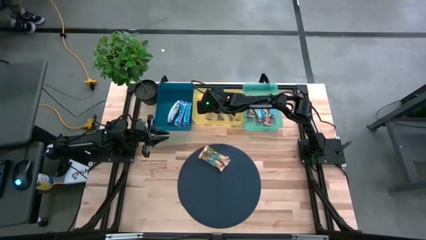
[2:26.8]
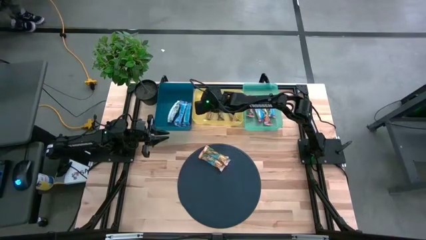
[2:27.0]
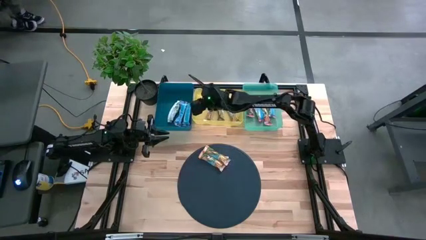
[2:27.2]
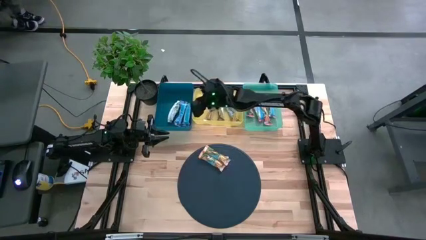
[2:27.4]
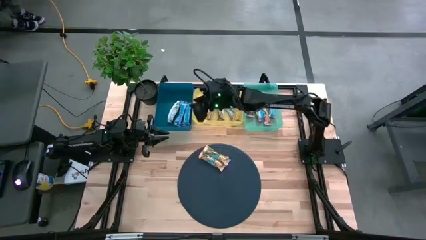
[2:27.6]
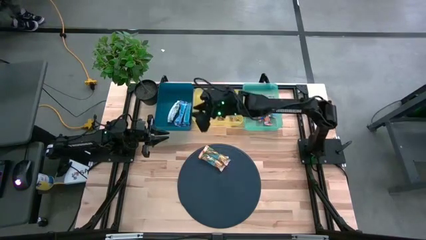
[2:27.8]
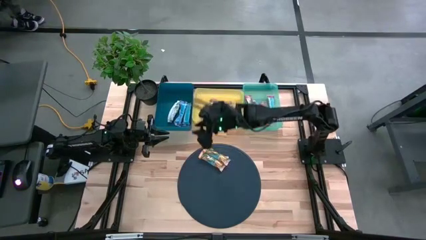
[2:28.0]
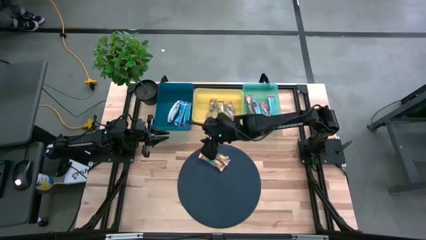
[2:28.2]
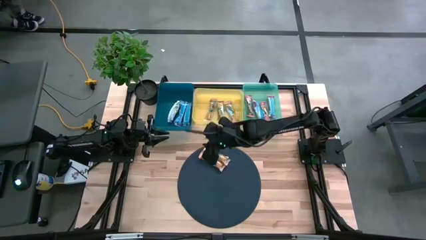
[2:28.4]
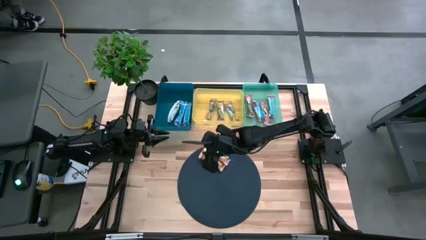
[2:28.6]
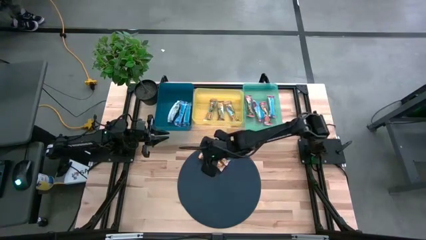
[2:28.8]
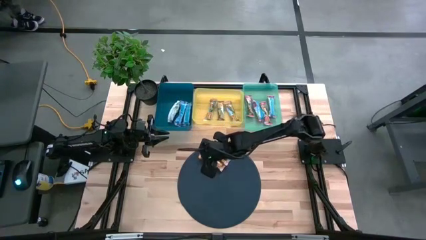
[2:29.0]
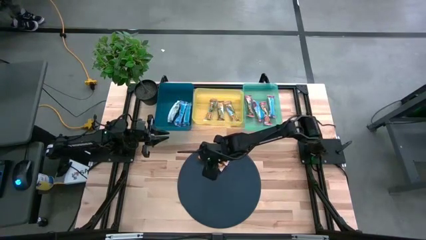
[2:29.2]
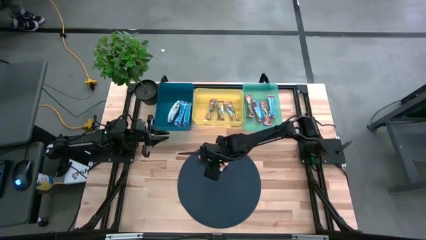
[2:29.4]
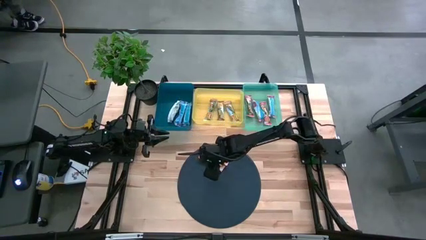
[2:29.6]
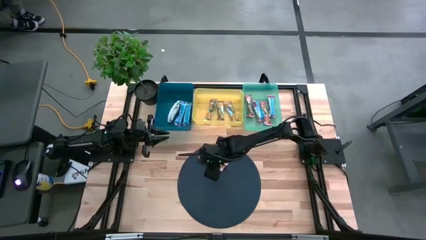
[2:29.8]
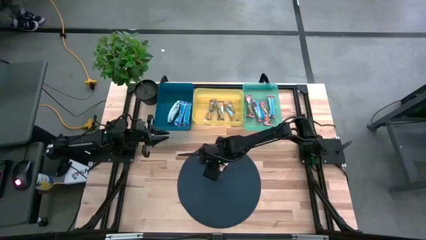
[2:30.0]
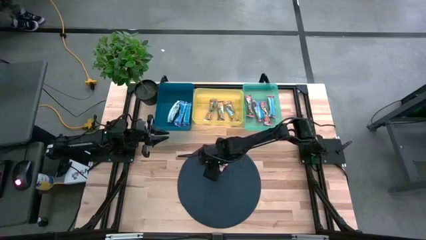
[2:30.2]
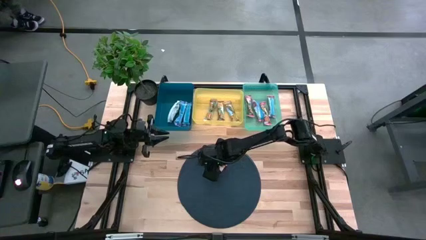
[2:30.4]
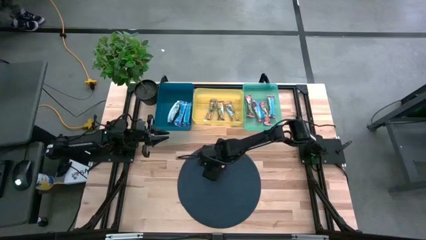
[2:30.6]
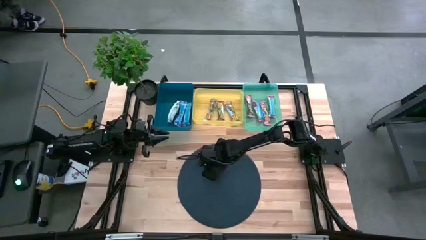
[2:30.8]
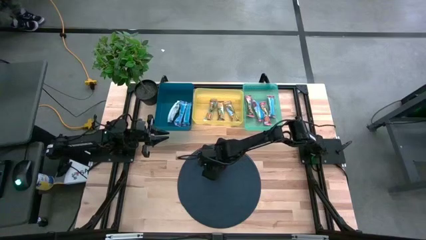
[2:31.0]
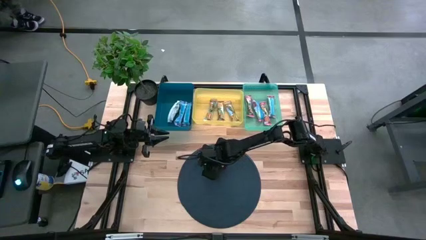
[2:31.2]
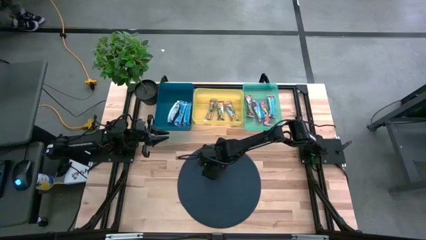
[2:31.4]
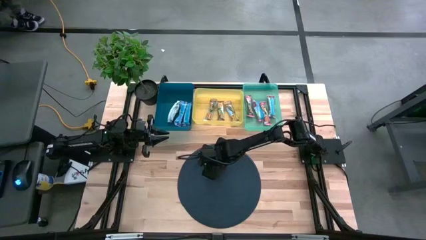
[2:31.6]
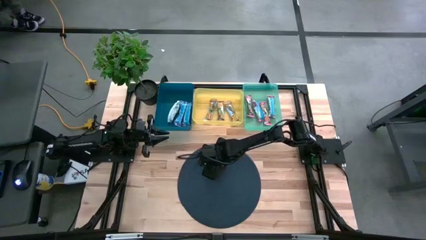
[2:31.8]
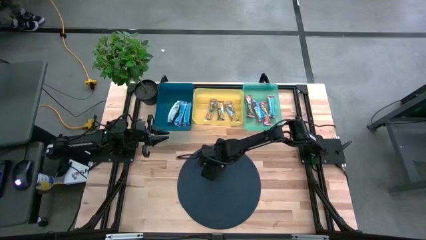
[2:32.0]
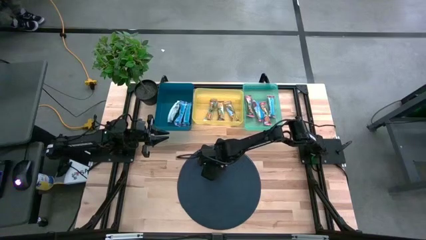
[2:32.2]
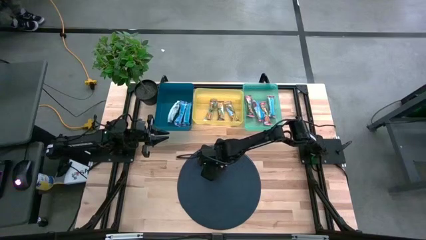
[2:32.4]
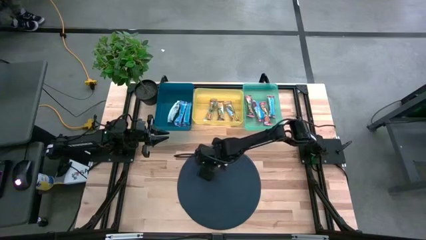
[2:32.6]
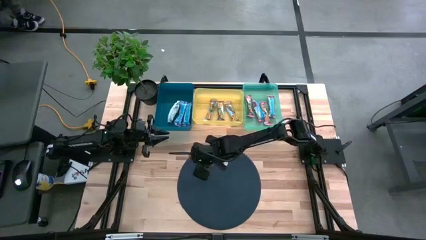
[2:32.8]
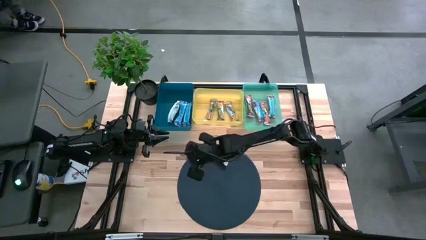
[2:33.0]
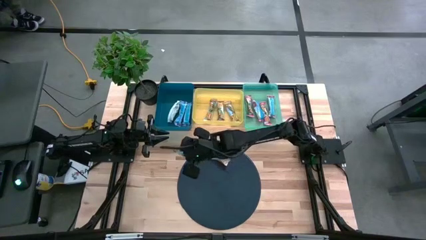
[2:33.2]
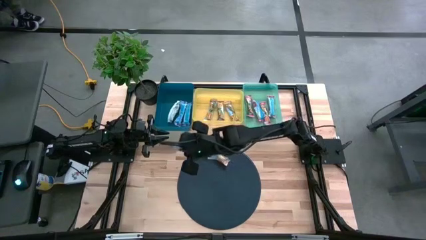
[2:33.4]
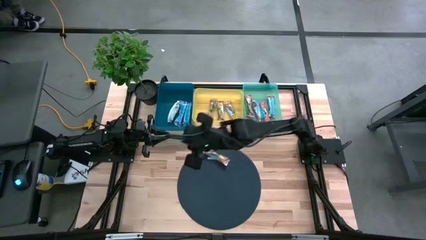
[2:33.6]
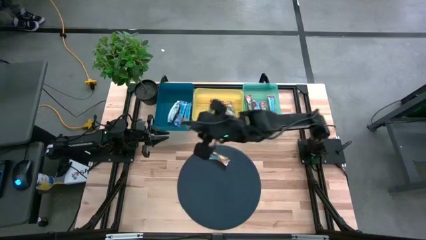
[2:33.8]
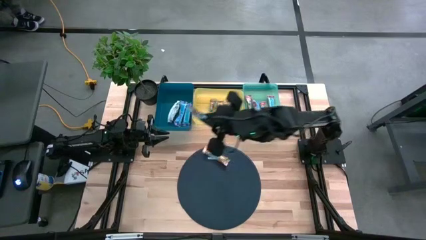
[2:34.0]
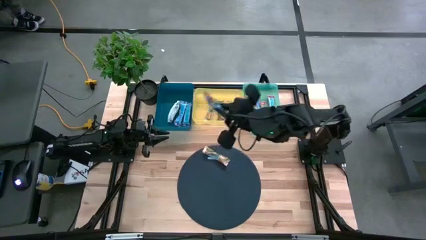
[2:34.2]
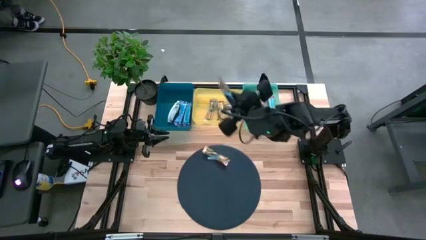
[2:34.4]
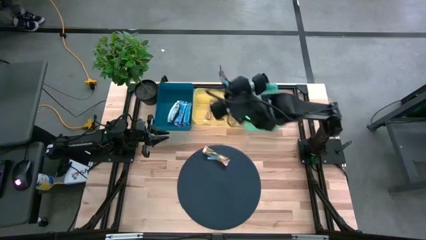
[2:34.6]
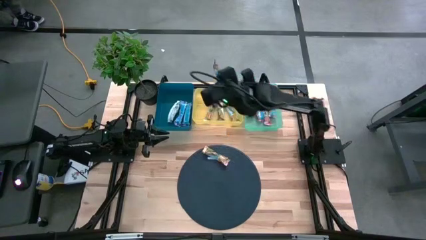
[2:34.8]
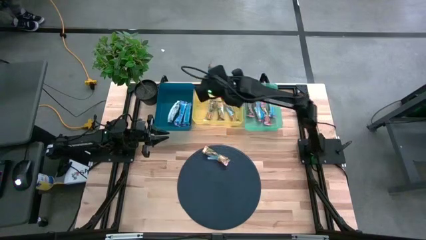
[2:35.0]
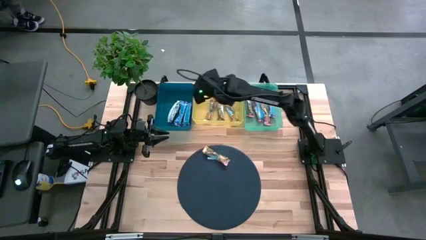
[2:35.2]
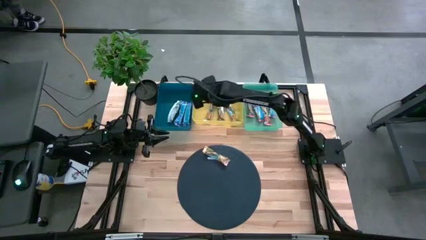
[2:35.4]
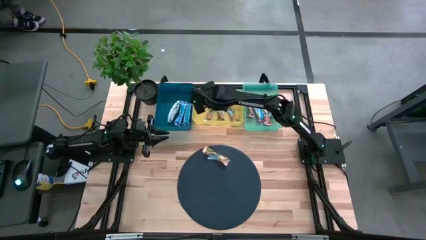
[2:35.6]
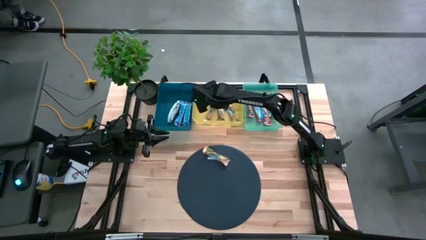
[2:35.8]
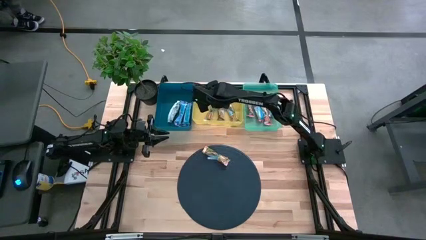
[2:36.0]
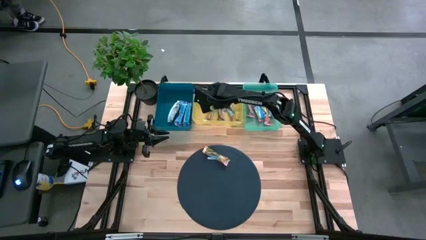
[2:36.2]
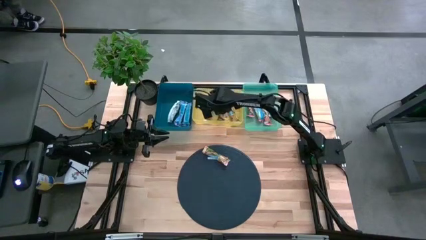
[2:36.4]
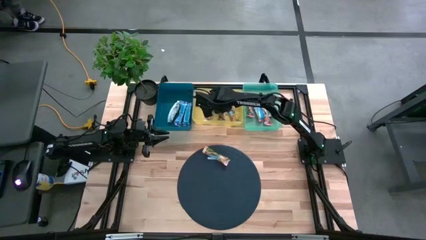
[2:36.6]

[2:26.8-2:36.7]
Task: Pick and place Granola Bars by type
Put the yellow granola bar into the yellow bin

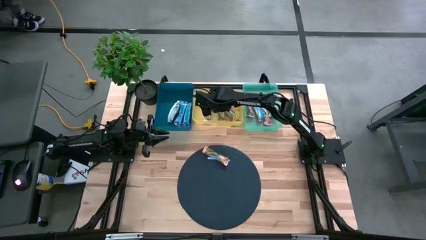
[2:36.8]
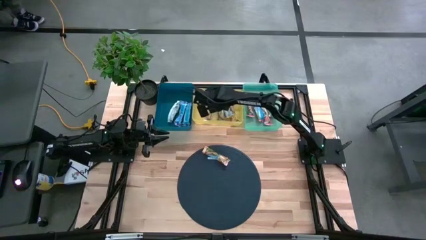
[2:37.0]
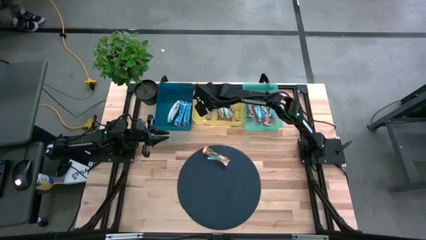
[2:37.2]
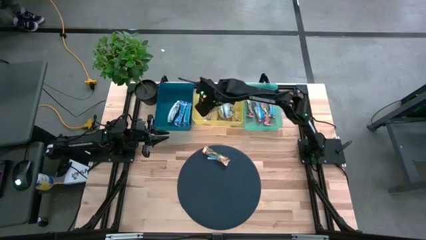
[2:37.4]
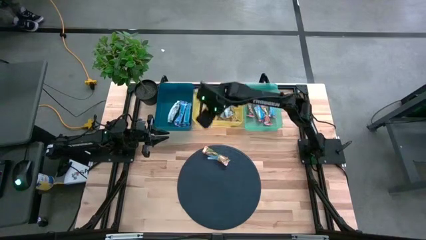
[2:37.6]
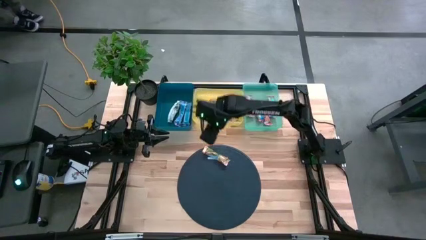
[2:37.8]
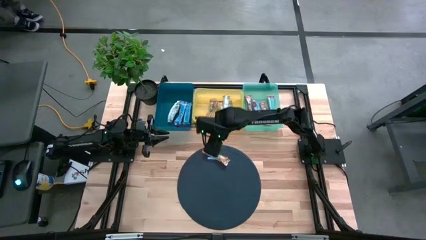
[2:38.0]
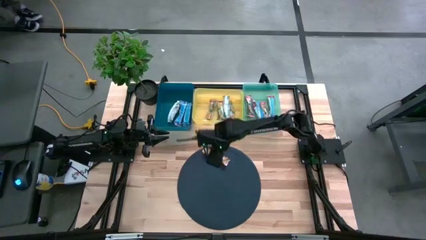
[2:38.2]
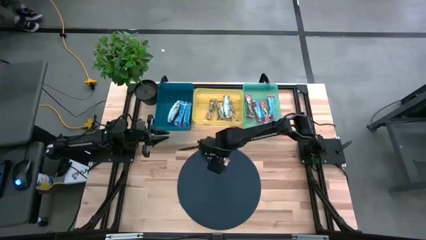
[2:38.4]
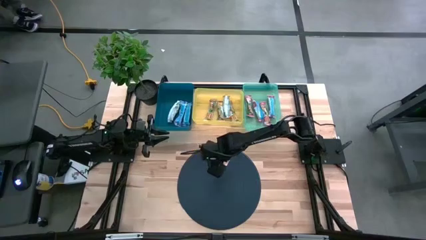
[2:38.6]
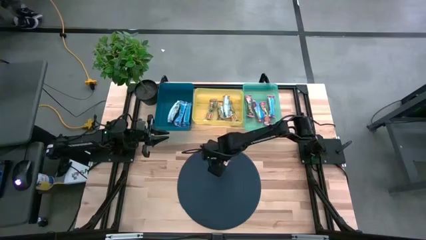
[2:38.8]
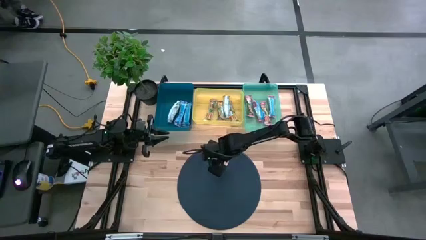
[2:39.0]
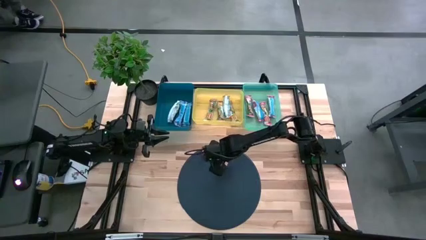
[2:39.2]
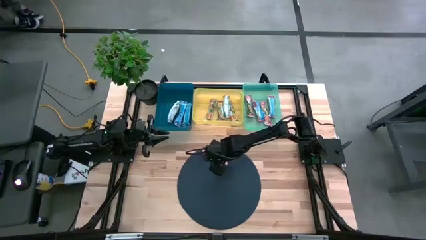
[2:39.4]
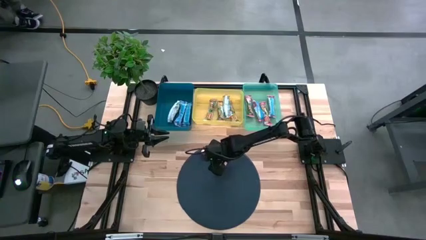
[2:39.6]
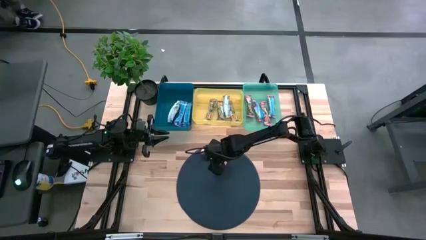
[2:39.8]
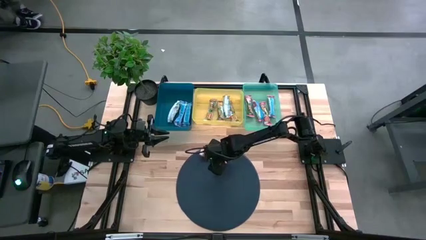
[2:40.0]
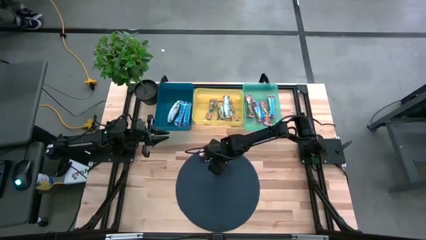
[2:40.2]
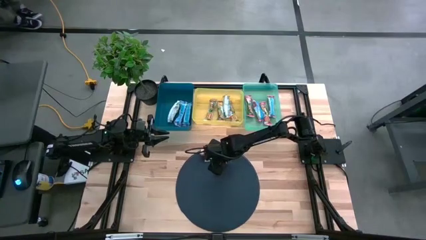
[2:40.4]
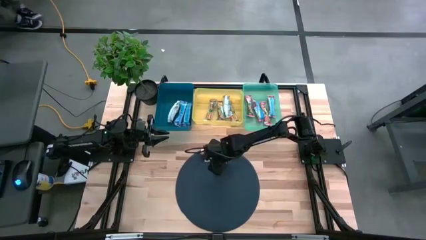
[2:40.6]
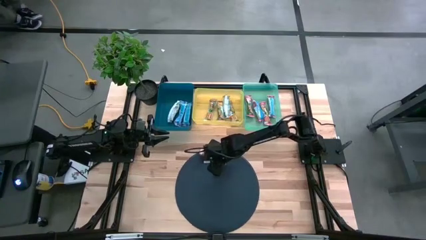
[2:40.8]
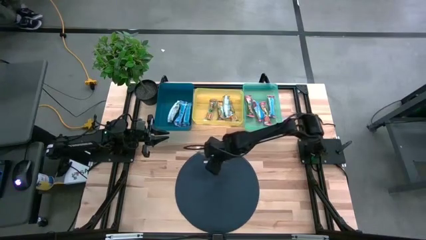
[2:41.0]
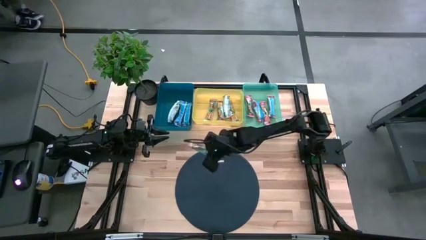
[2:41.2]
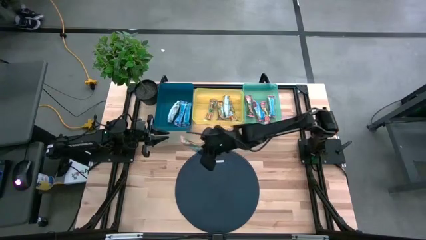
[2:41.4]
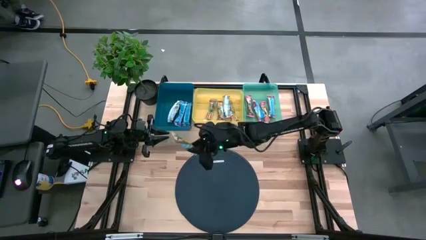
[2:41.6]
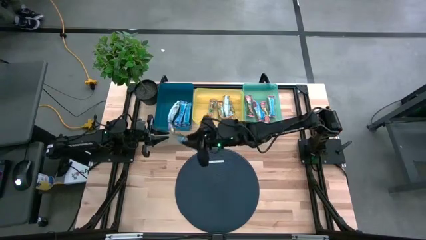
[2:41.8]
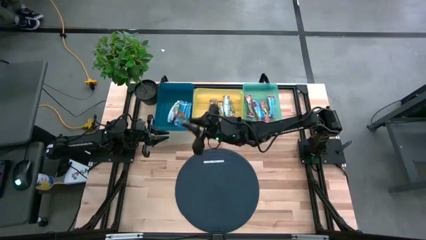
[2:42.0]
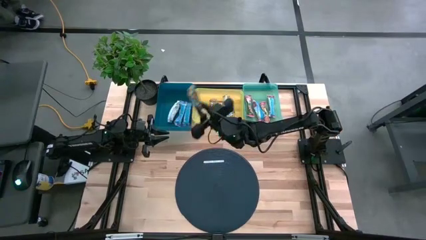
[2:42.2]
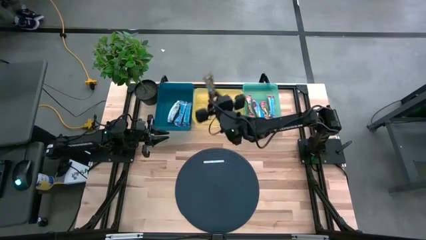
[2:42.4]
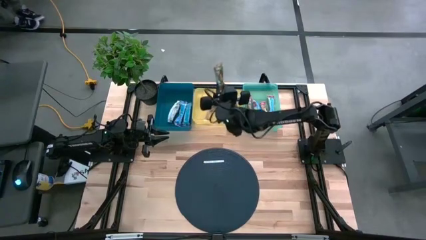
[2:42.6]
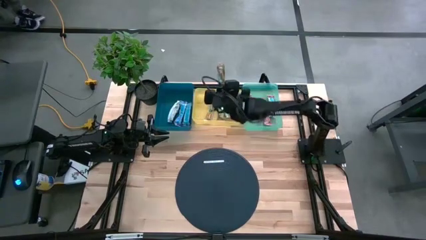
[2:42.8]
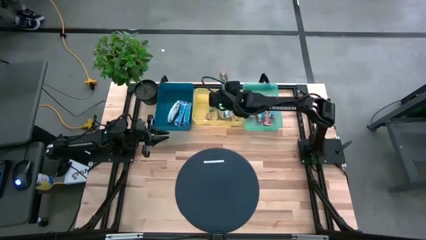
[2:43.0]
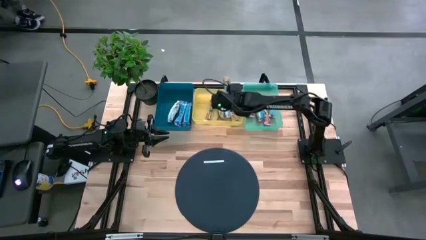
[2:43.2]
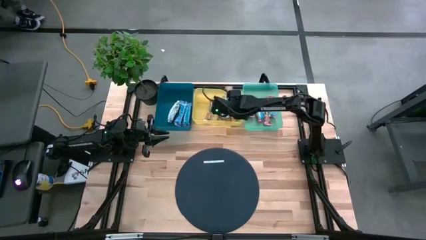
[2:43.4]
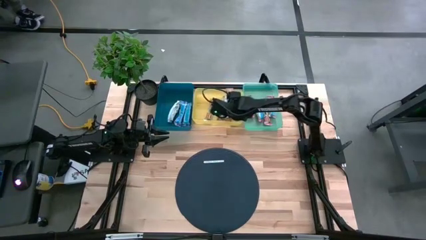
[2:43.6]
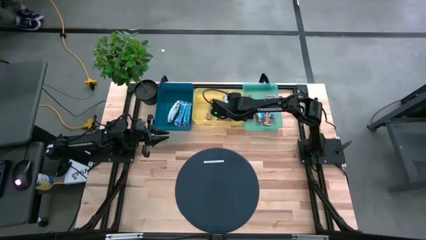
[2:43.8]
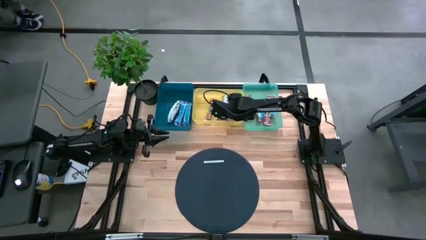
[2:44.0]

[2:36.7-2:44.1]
Put the yellow granola bar into the yellow bin
